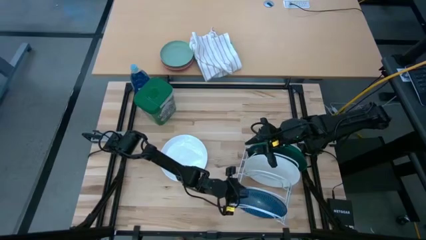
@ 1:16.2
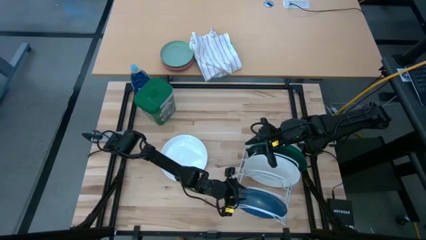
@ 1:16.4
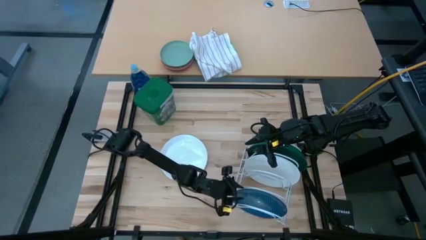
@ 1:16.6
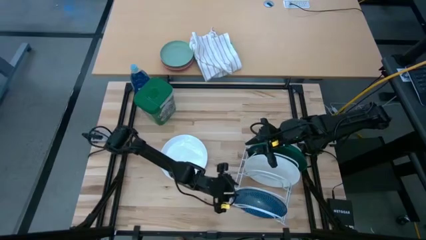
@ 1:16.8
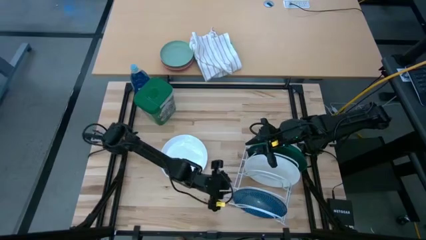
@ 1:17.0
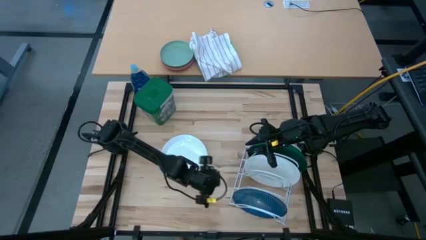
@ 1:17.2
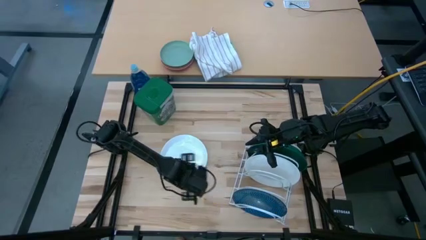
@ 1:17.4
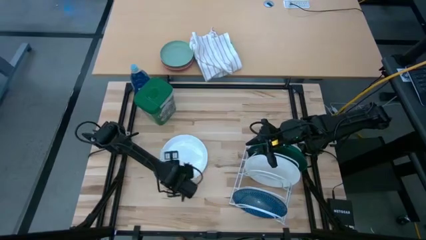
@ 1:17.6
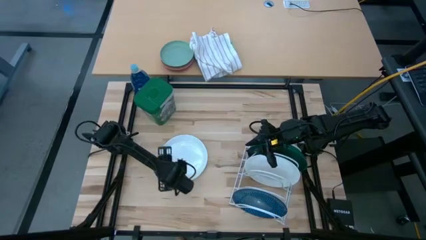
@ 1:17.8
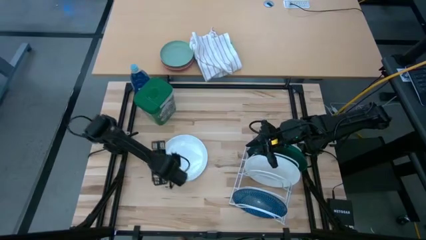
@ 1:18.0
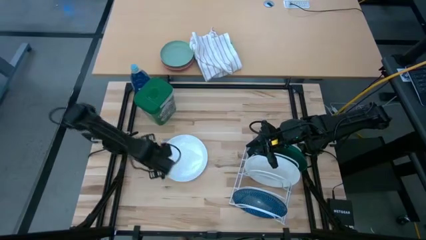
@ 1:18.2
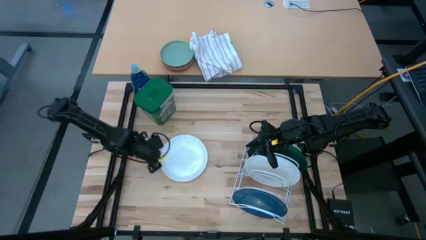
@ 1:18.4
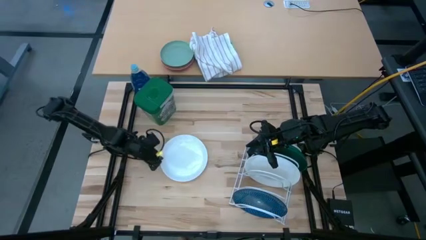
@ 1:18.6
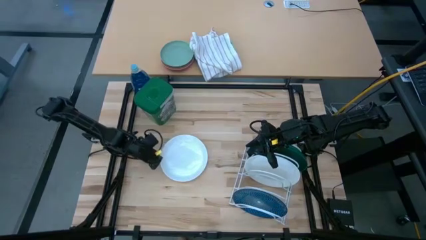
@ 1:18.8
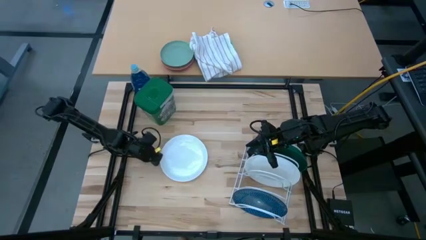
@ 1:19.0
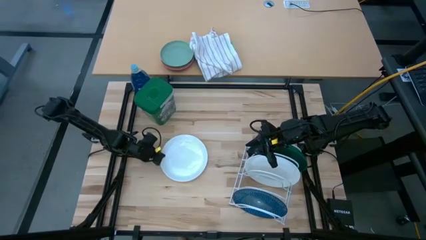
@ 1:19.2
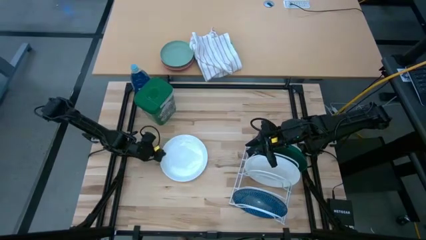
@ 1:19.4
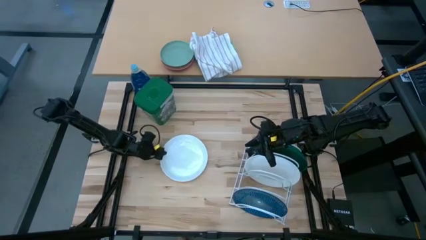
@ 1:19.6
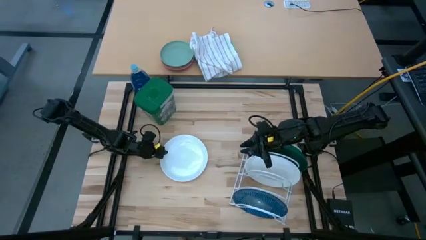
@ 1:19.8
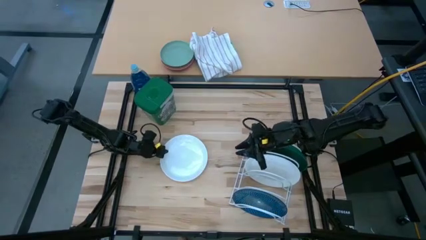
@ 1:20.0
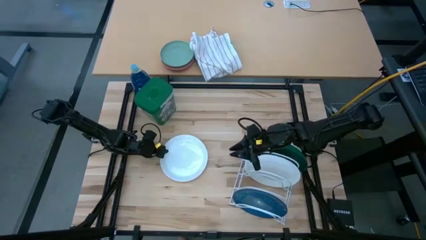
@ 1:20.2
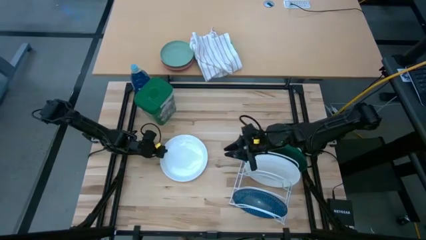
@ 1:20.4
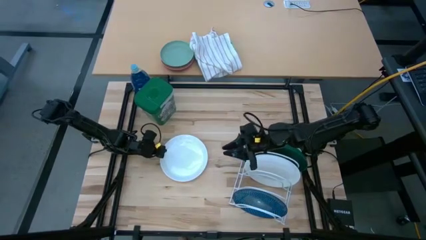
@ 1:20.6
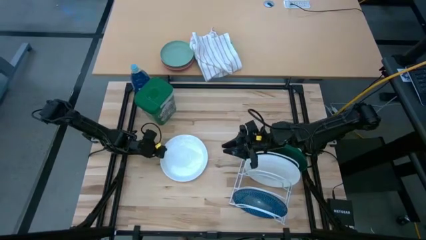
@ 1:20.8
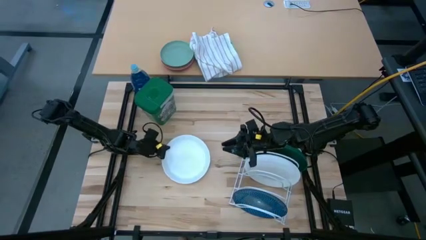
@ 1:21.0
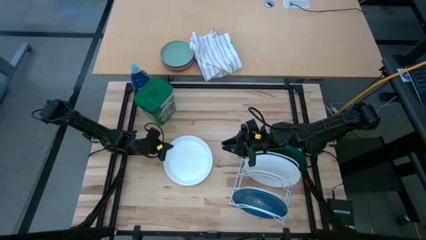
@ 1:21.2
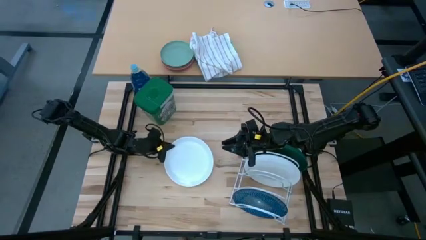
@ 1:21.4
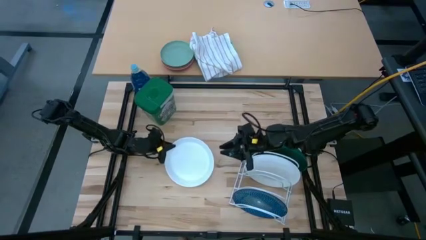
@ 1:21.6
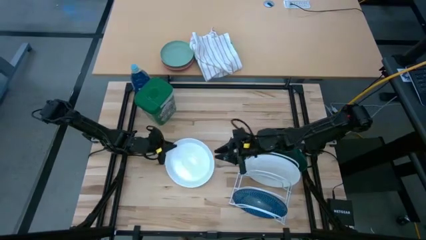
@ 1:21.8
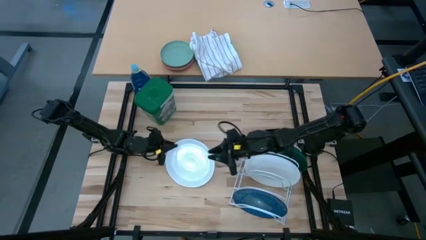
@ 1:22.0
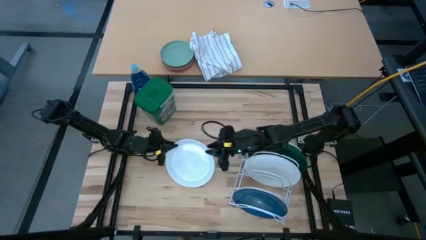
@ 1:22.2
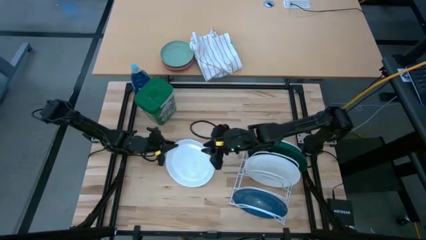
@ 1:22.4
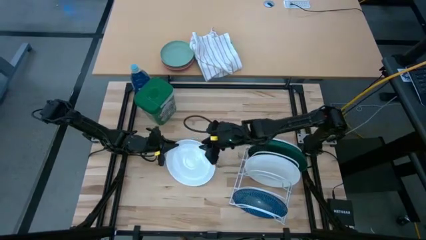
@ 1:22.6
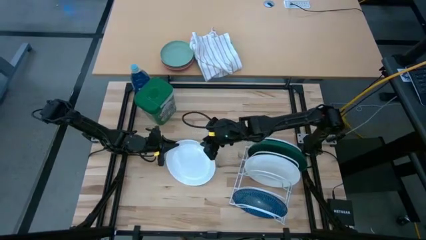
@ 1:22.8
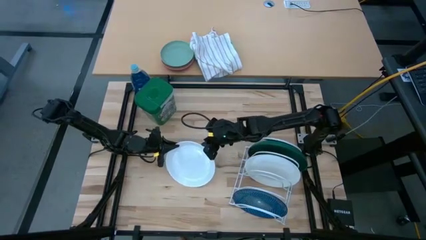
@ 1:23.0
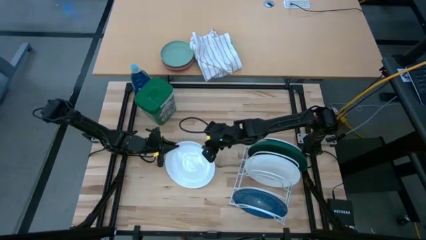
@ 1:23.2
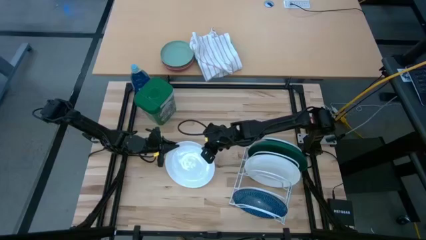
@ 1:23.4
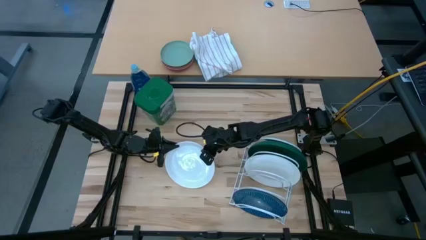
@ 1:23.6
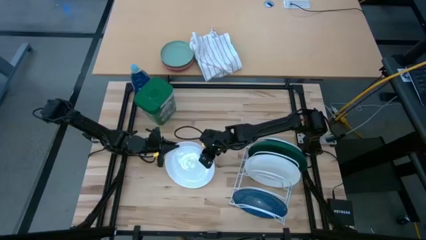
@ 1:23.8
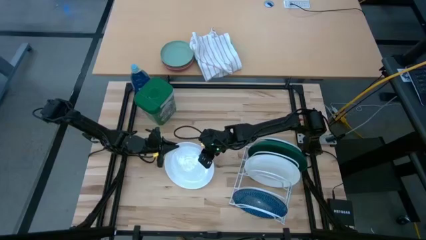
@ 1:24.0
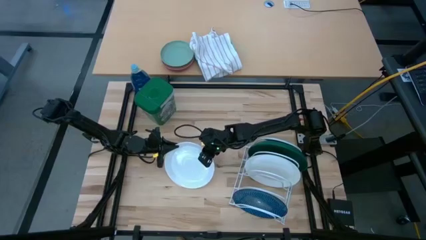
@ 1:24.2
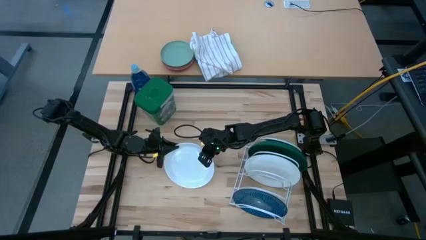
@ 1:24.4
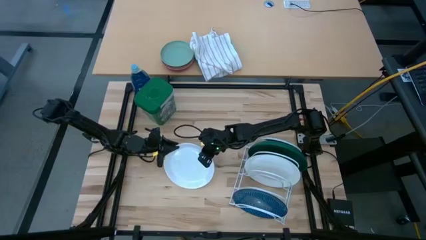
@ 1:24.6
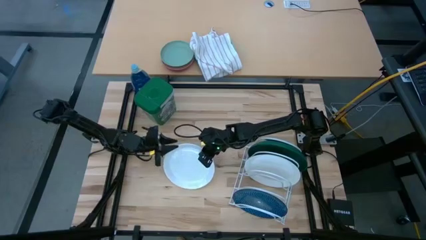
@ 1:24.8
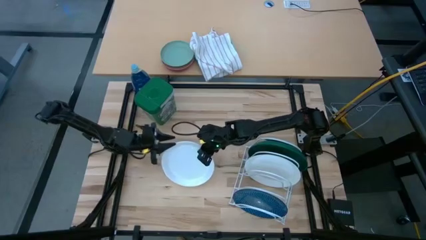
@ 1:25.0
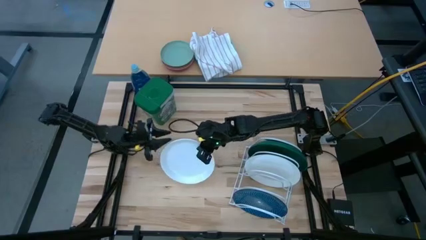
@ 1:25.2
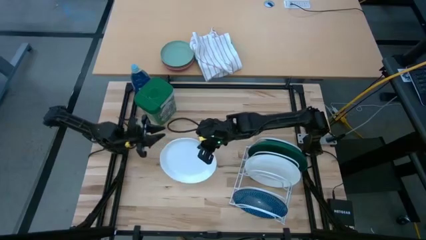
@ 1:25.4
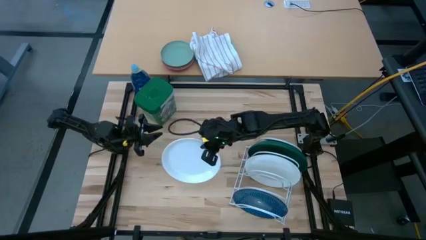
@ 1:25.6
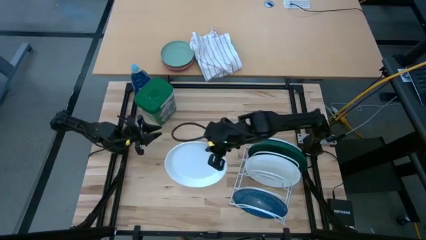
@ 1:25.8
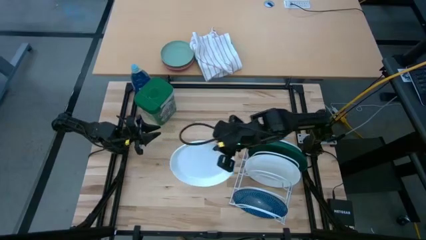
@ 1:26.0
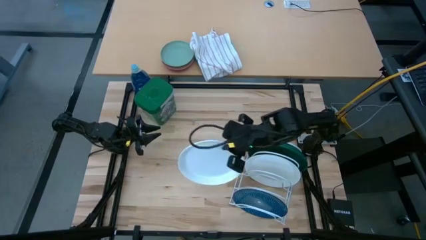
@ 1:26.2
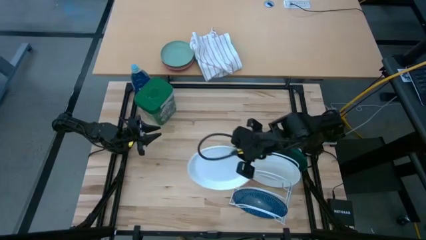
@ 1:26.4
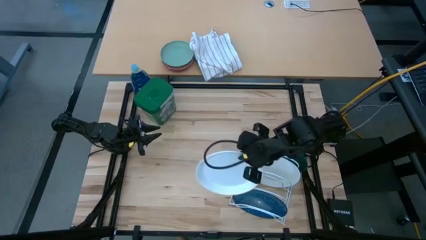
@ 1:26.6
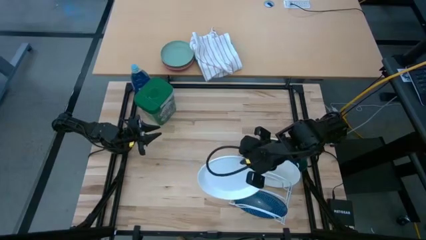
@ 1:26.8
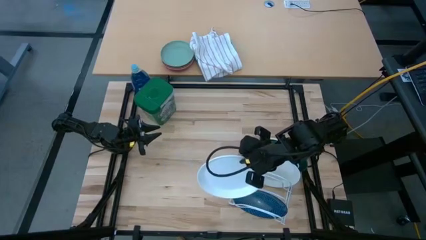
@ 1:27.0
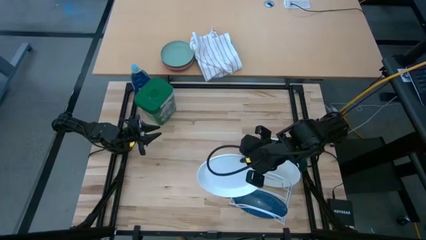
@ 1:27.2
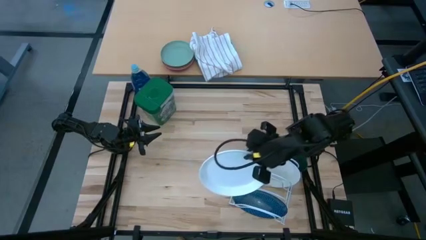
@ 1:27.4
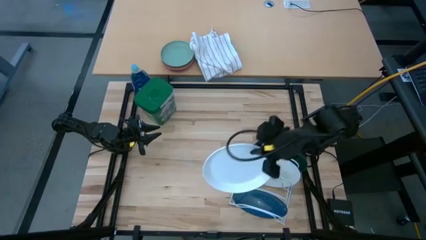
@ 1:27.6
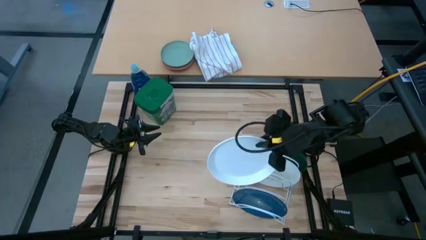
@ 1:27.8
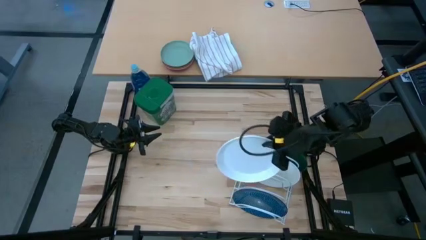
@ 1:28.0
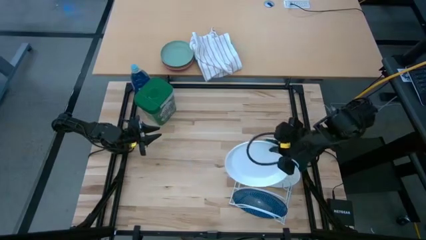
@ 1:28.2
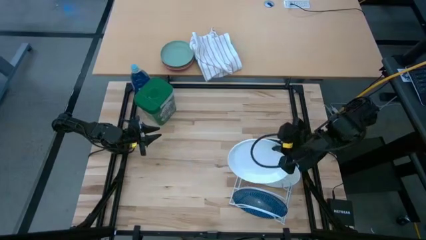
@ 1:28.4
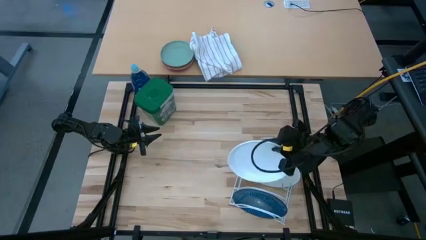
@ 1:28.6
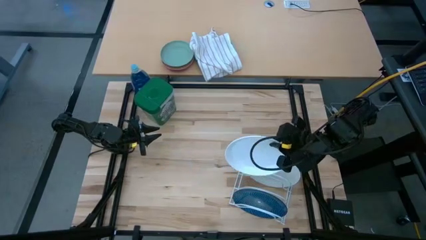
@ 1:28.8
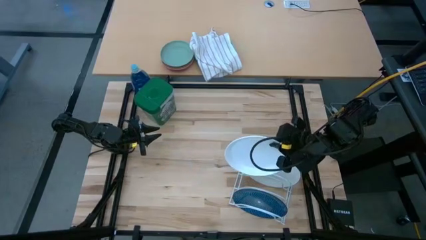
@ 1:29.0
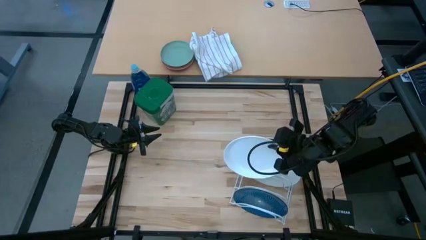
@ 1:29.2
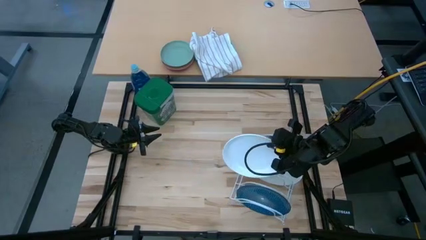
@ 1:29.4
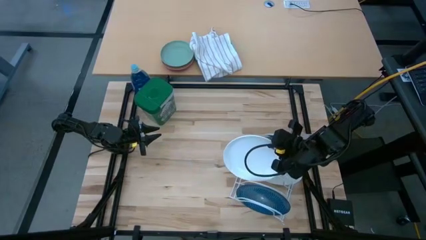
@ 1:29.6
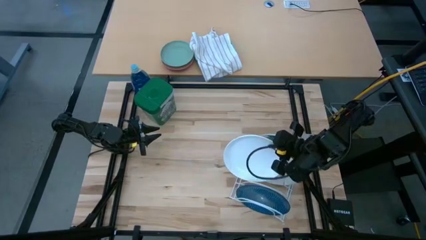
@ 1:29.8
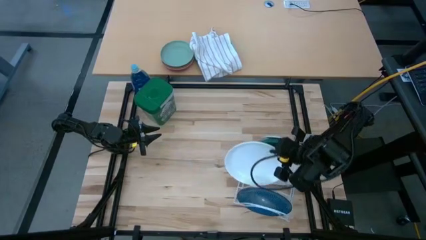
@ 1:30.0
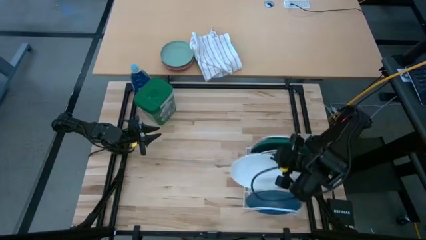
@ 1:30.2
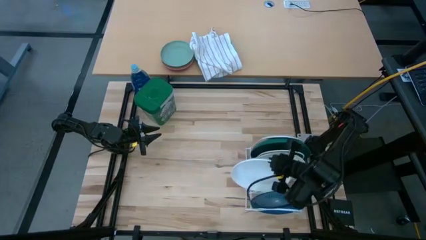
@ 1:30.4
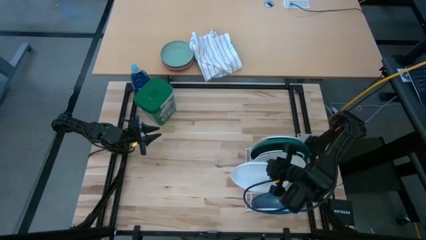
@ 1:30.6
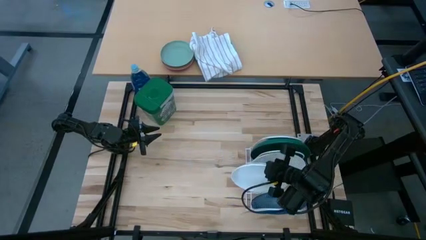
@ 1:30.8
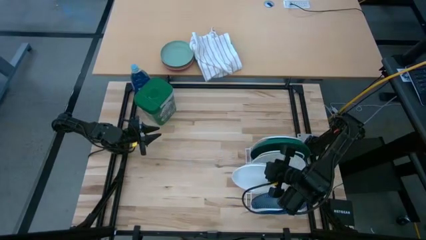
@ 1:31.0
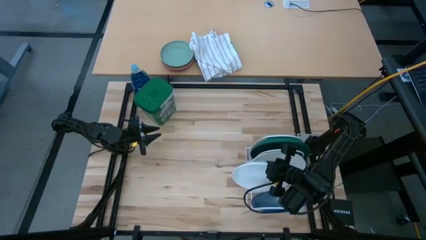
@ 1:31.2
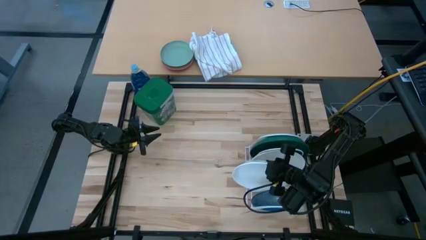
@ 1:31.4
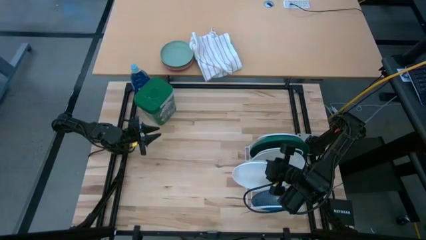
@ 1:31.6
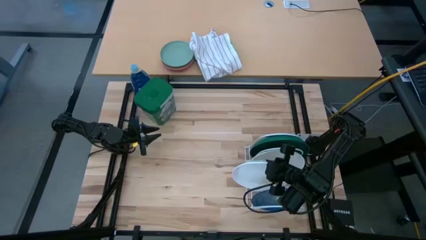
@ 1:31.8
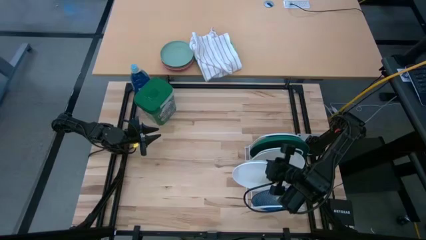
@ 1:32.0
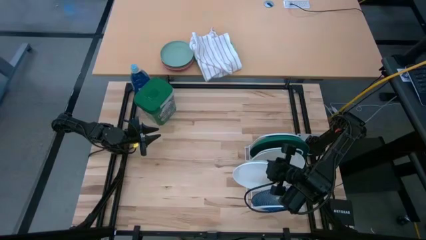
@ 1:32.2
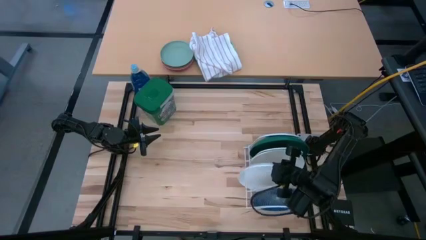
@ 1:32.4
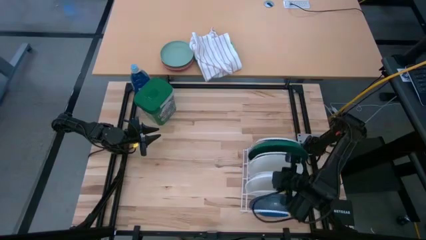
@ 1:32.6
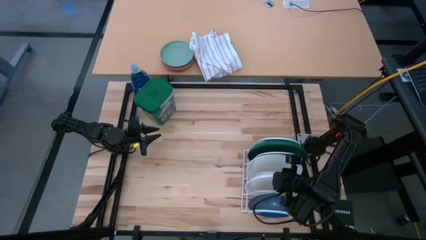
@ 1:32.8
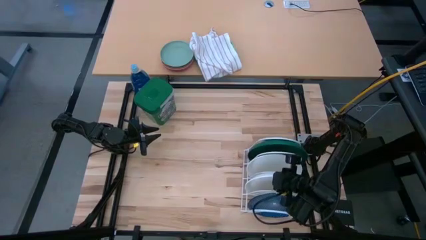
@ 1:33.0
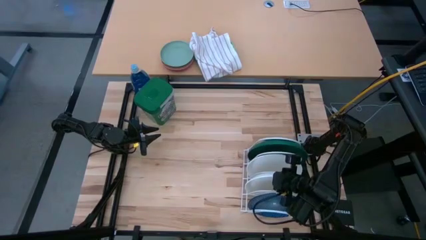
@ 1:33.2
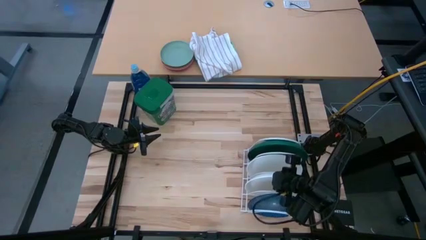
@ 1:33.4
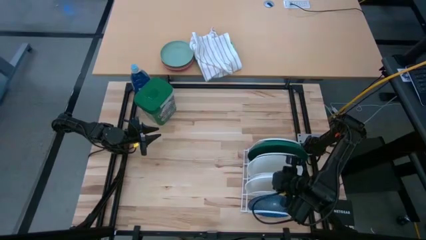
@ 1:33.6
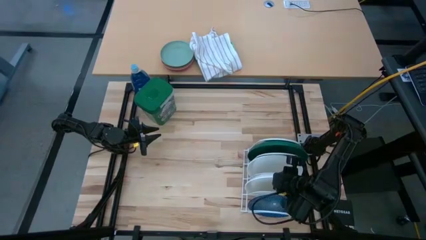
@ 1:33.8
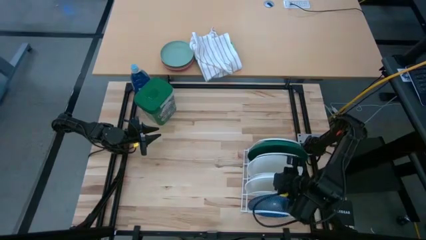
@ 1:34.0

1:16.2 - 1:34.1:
Task: Sort dishes
Put the white plate on the dish rack
